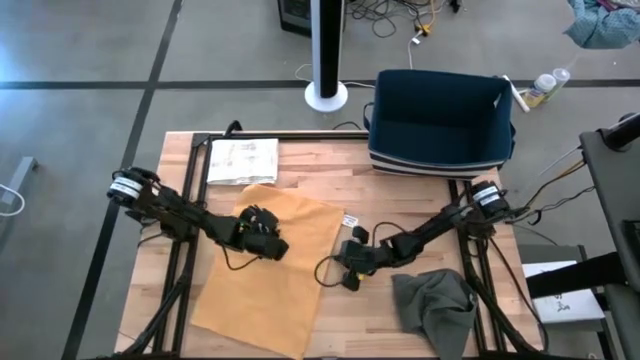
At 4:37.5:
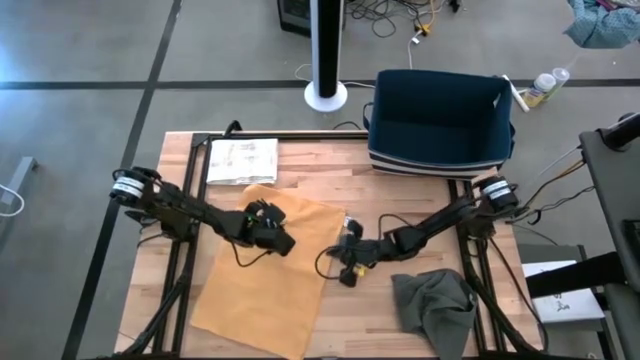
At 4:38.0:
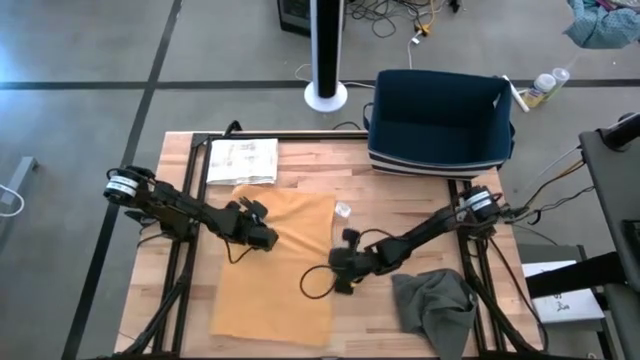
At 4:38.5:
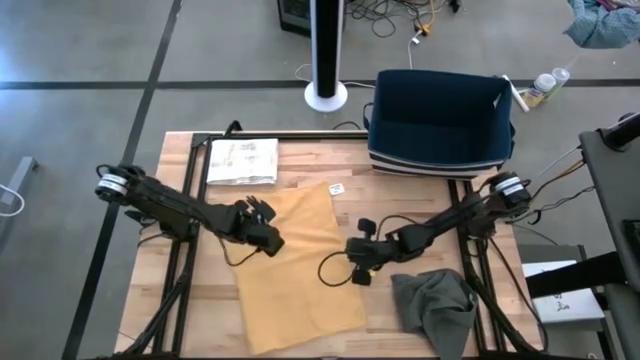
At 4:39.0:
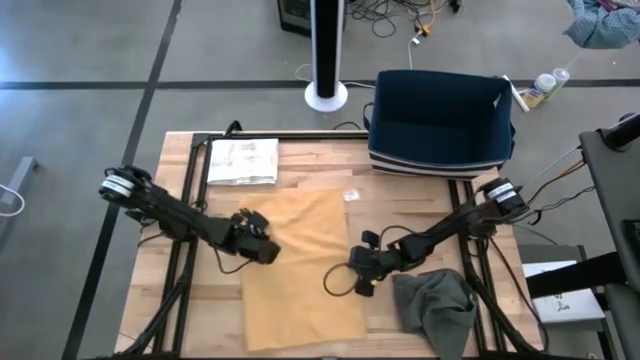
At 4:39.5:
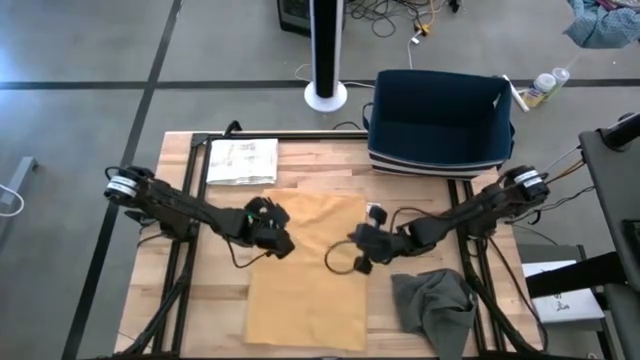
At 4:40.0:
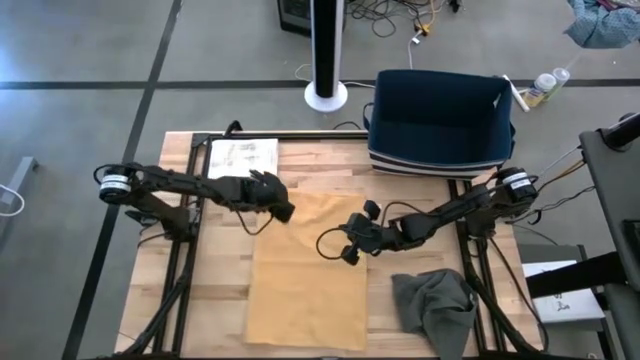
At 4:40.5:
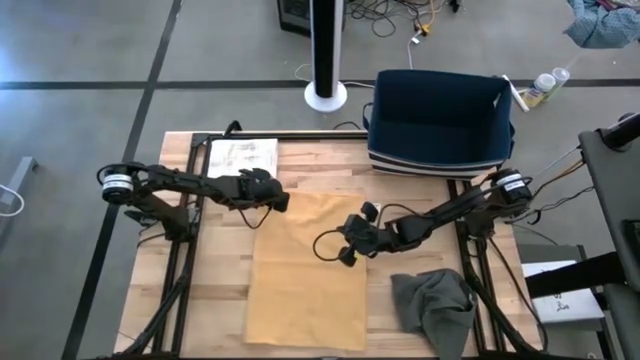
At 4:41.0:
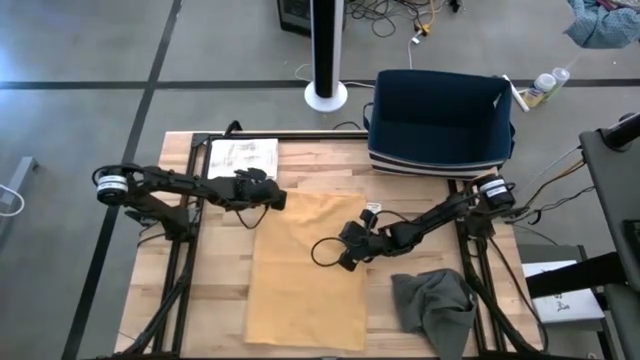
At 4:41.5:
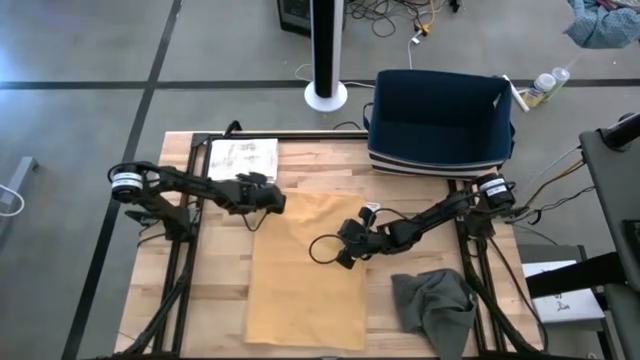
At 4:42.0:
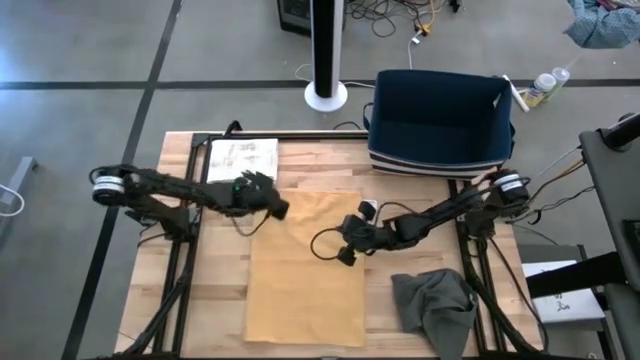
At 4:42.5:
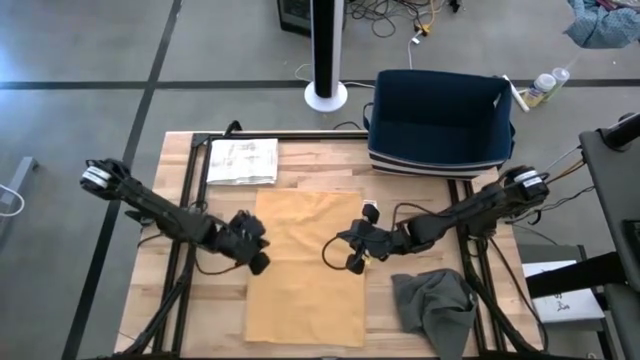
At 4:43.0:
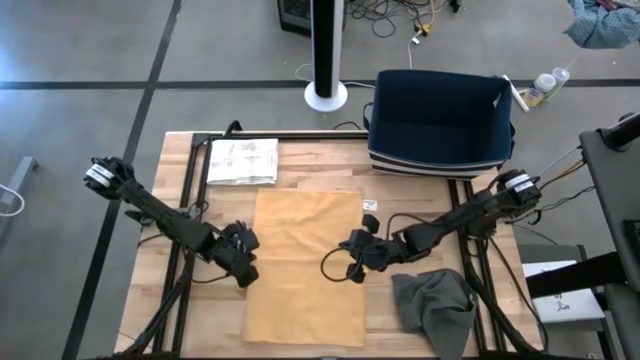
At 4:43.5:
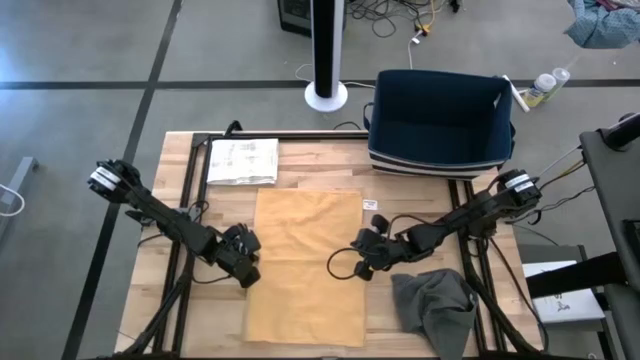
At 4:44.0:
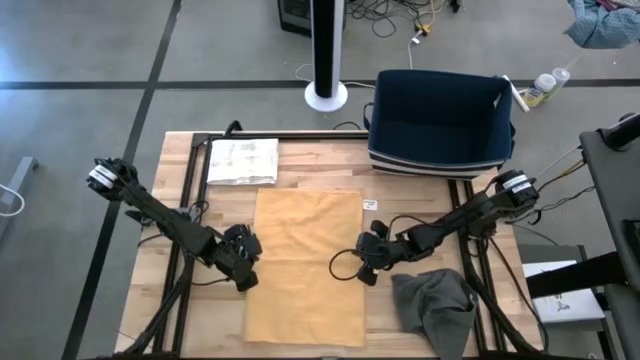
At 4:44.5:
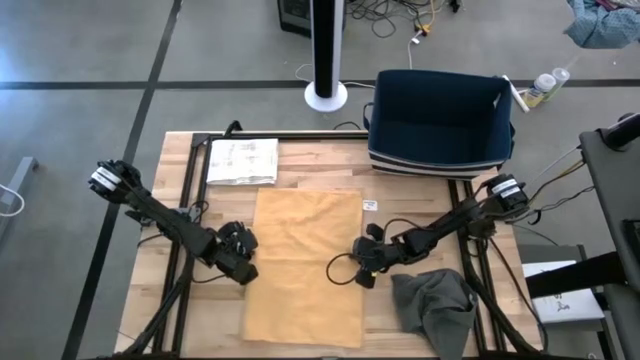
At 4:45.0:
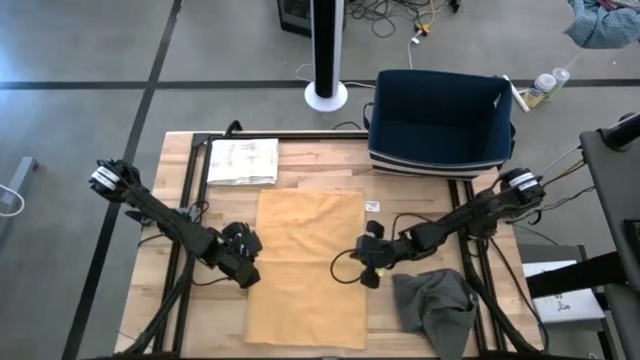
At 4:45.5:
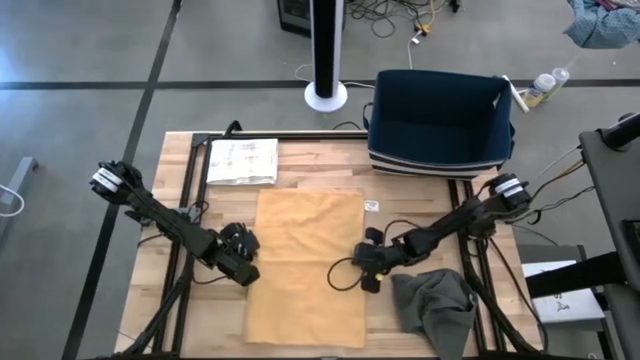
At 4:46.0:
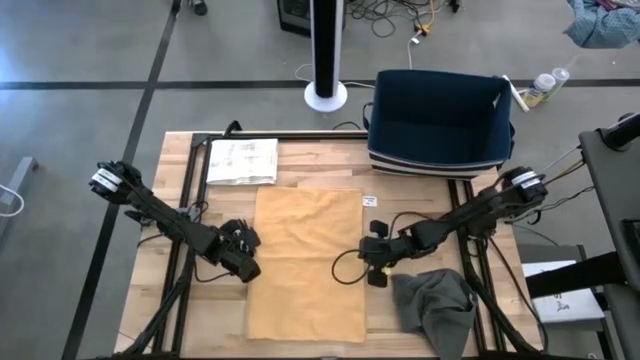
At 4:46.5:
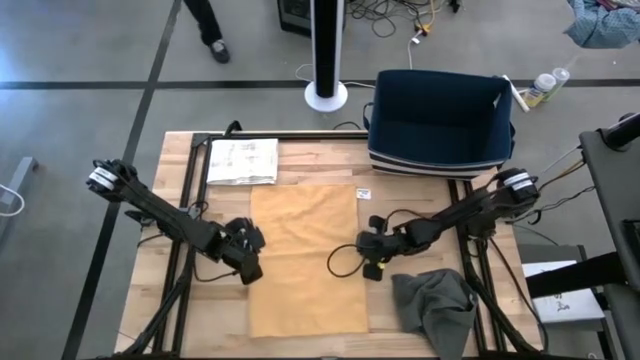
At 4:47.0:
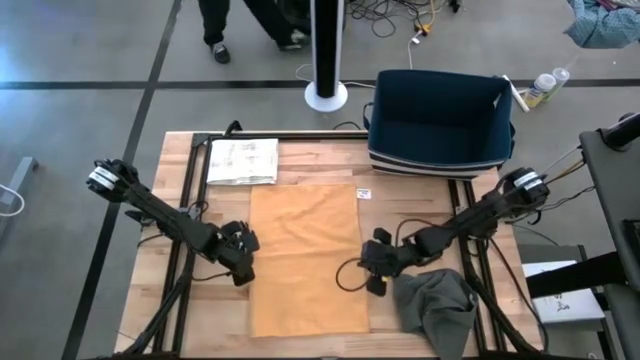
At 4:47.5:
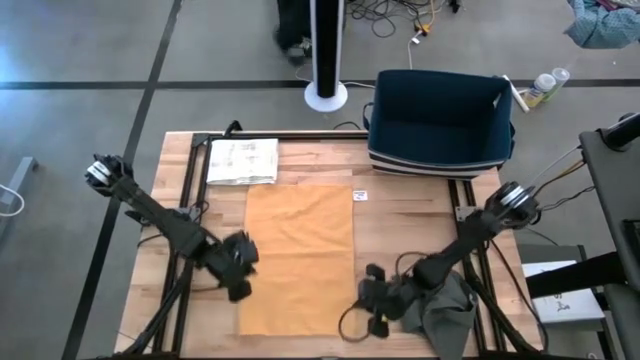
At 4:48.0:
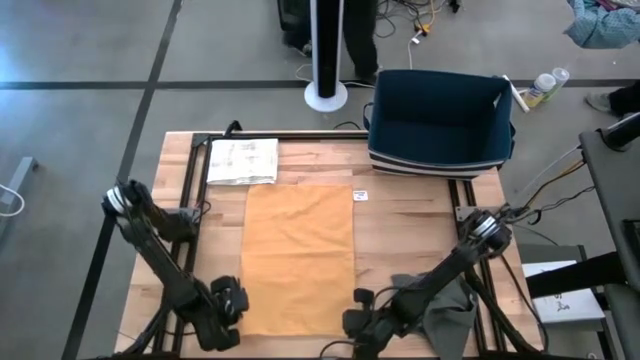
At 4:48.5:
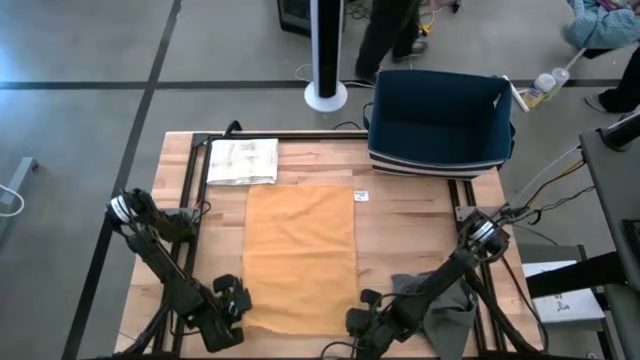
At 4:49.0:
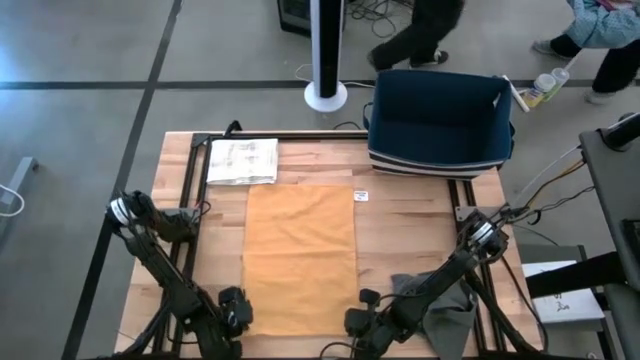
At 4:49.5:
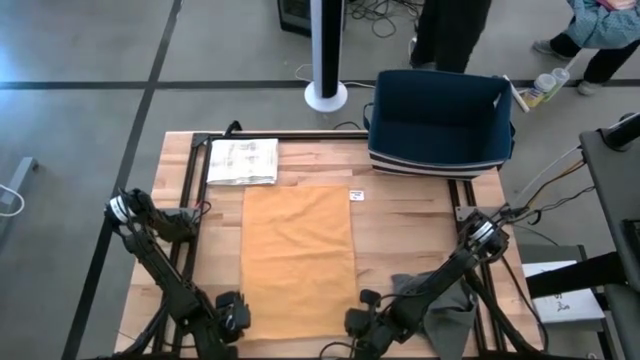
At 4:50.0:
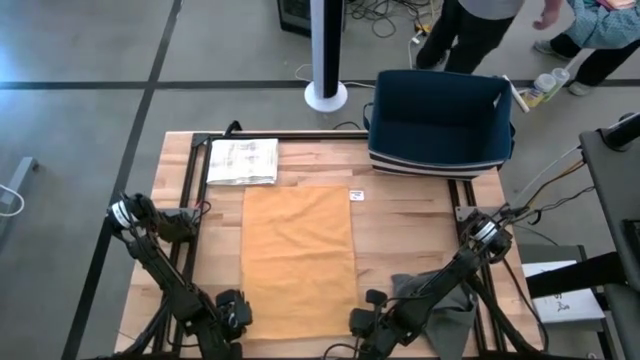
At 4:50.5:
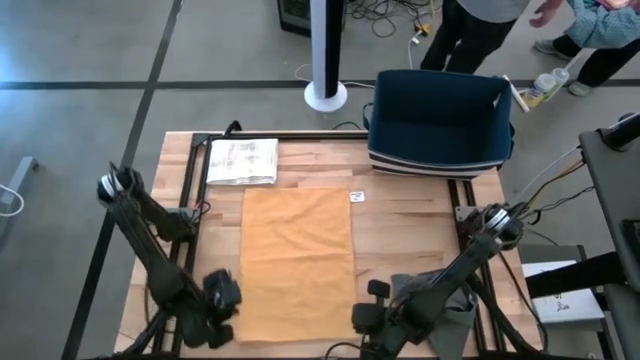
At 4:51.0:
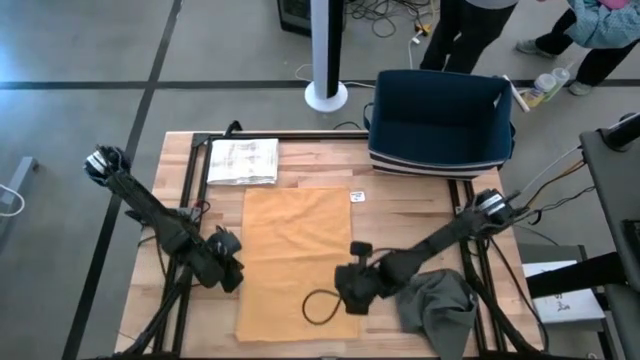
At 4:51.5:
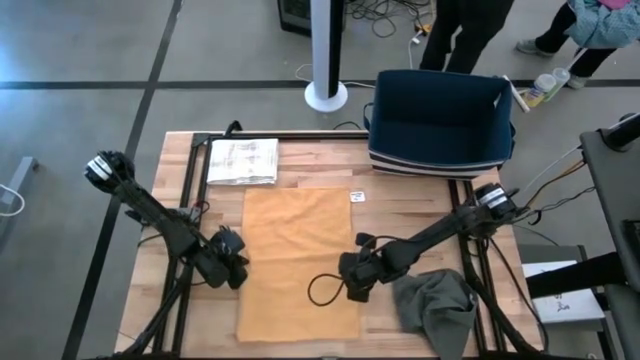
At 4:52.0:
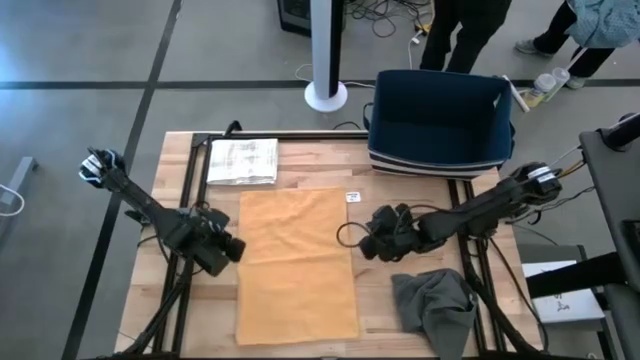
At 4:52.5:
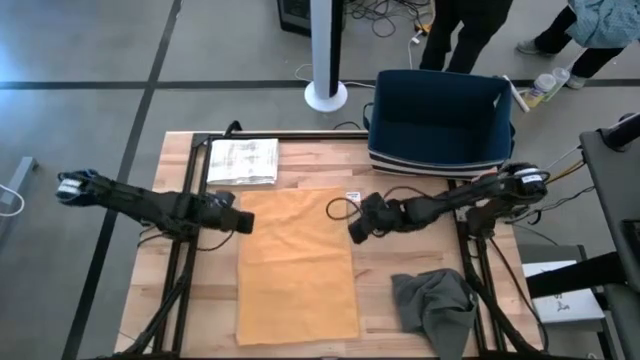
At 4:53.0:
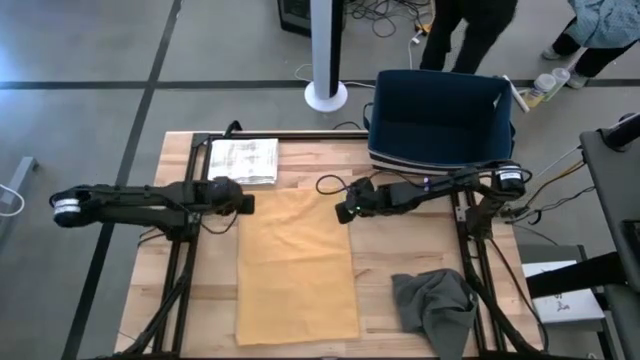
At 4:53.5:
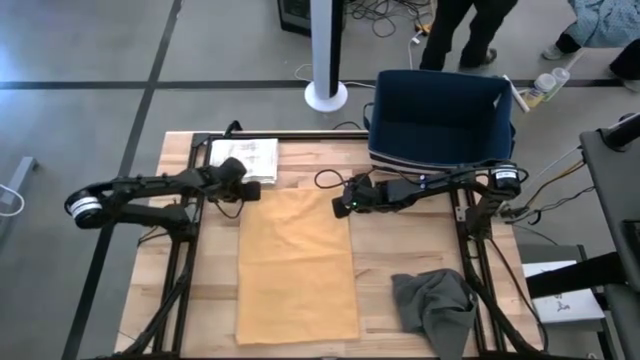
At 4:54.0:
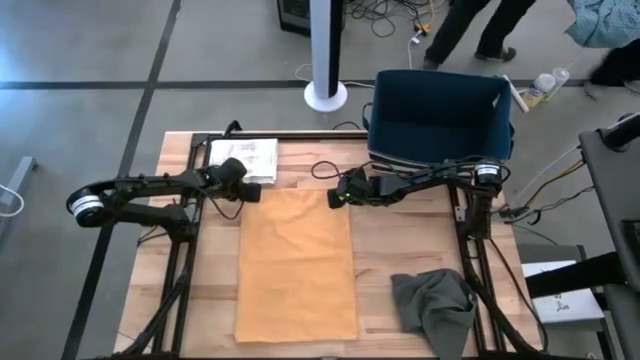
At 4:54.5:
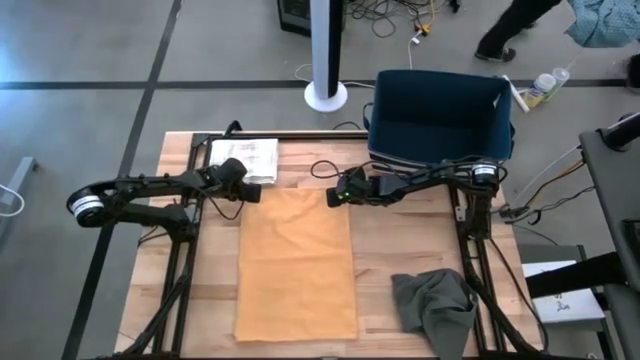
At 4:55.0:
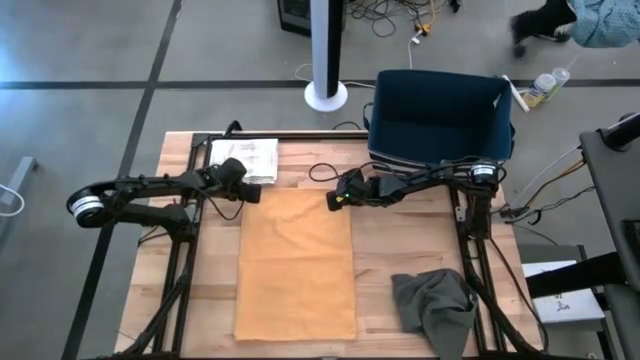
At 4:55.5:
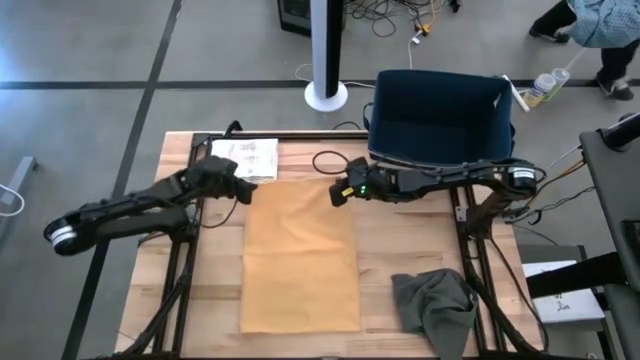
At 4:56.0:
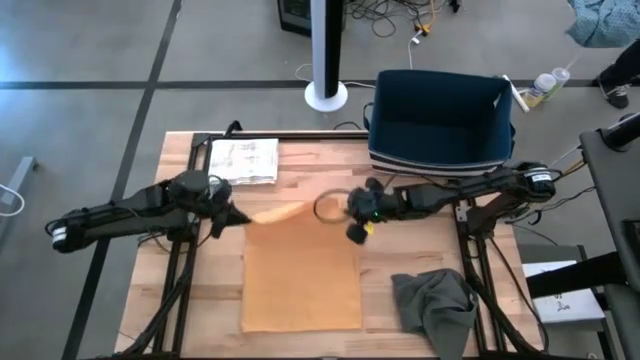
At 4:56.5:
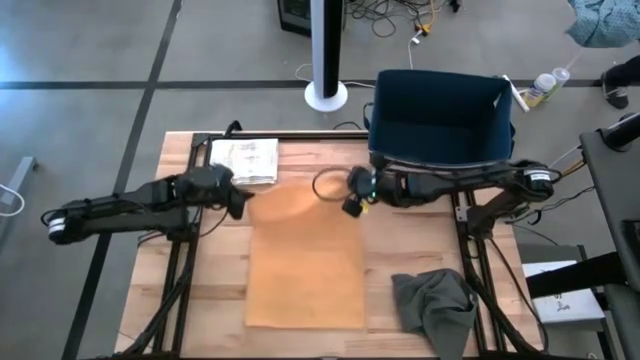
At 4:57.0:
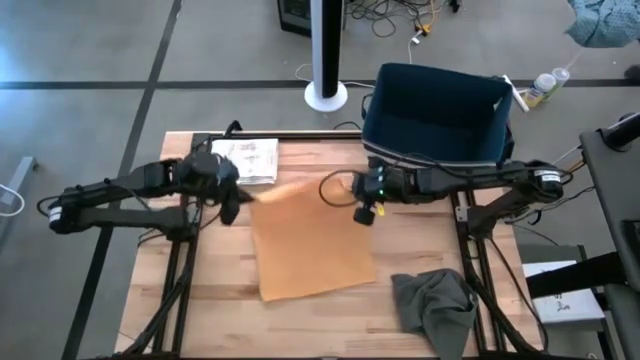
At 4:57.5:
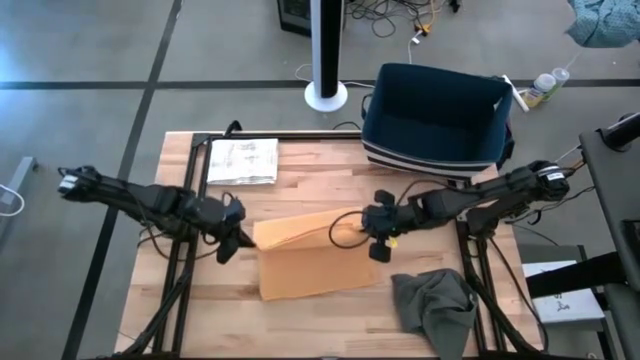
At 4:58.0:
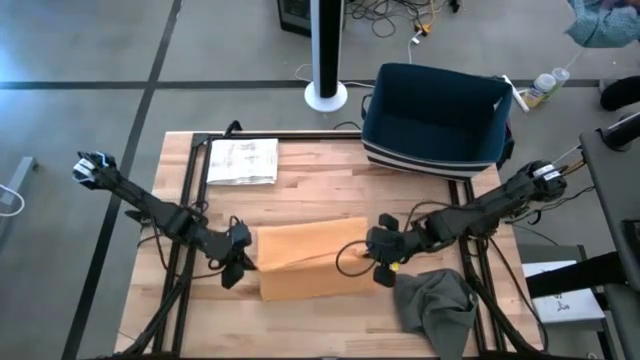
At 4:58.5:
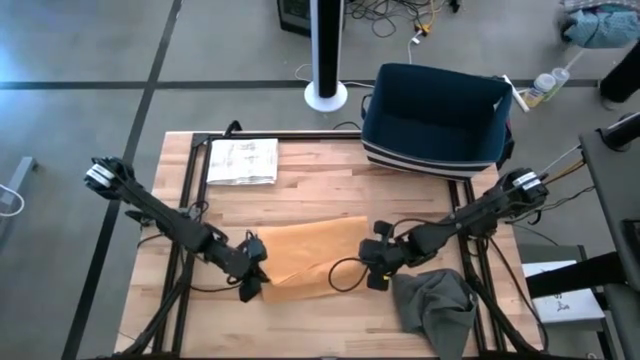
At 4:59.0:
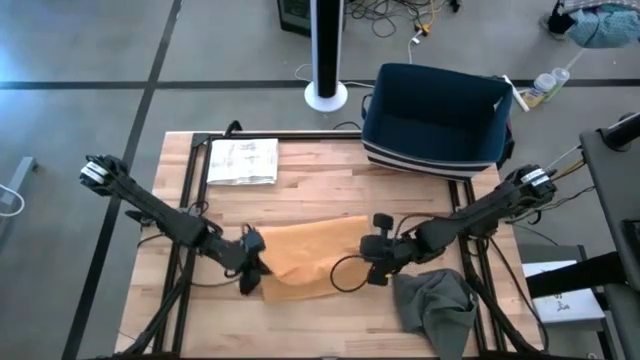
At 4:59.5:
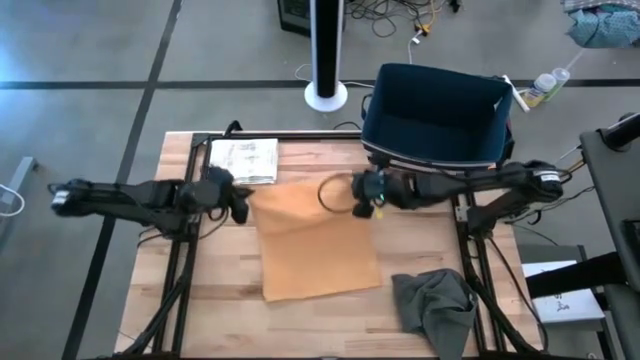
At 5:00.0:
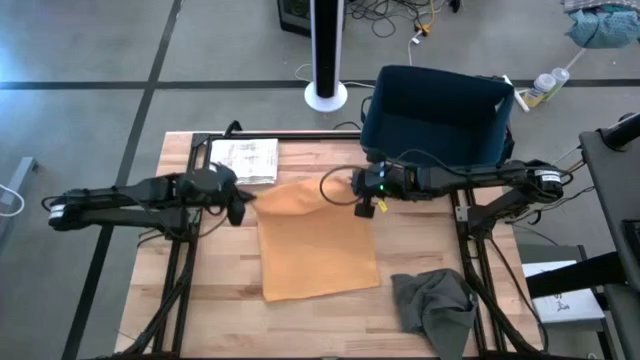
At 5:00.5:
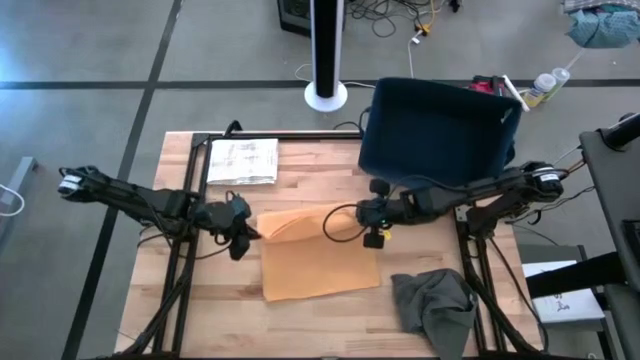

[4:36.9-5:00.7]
Task: Fold towel
Fold the yellow towel
